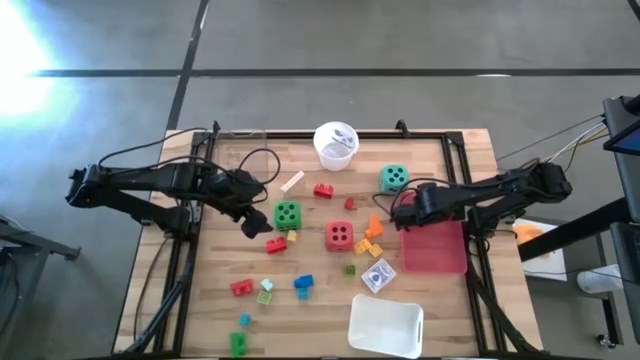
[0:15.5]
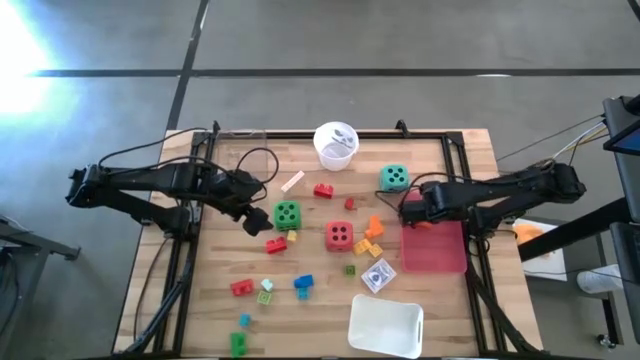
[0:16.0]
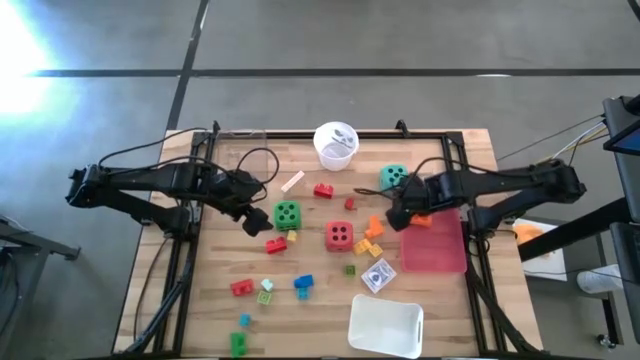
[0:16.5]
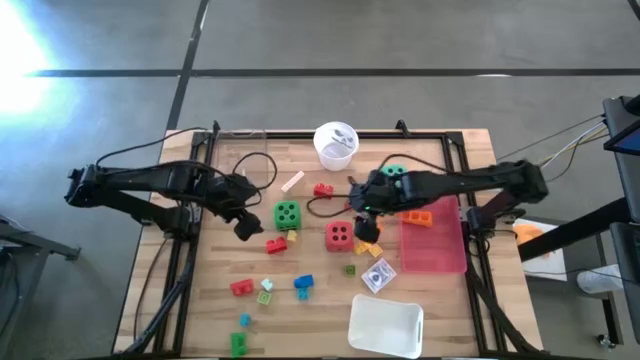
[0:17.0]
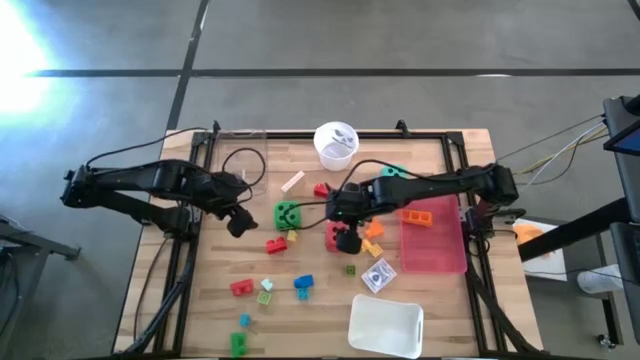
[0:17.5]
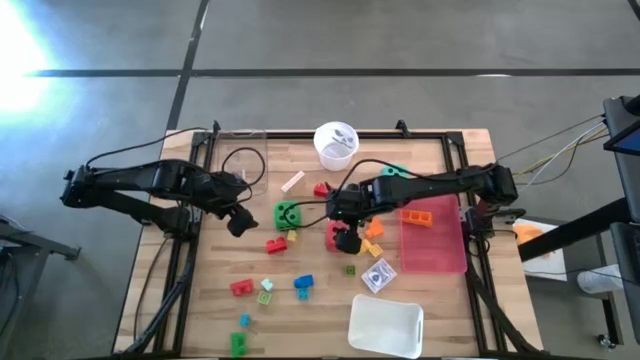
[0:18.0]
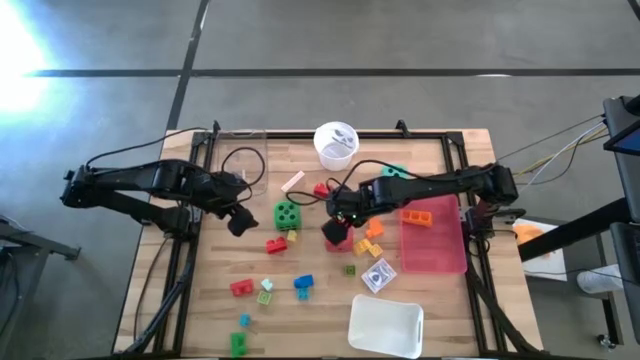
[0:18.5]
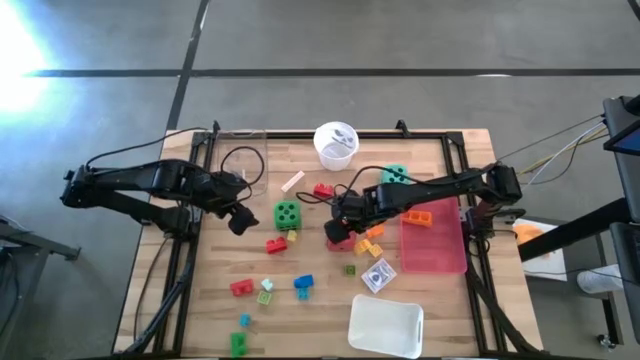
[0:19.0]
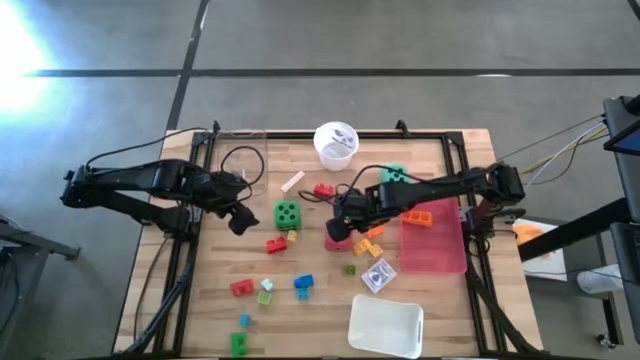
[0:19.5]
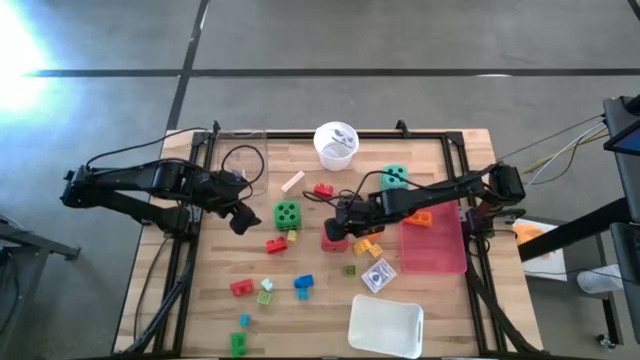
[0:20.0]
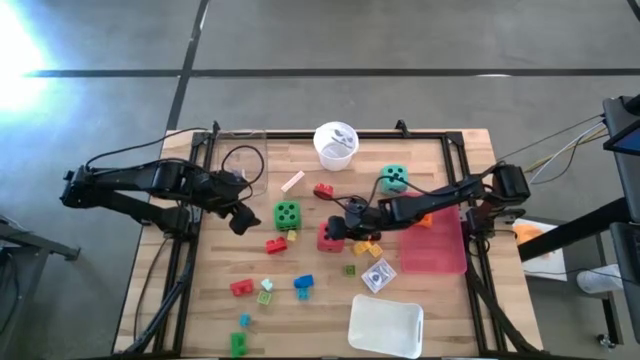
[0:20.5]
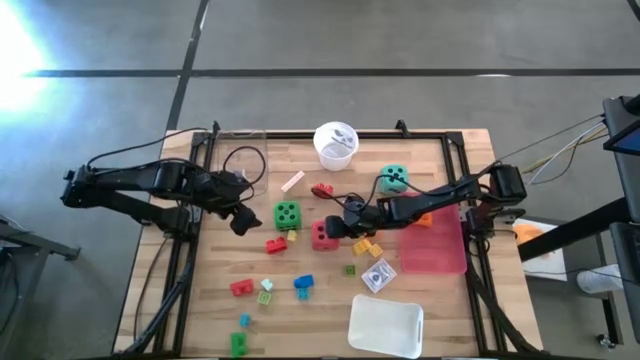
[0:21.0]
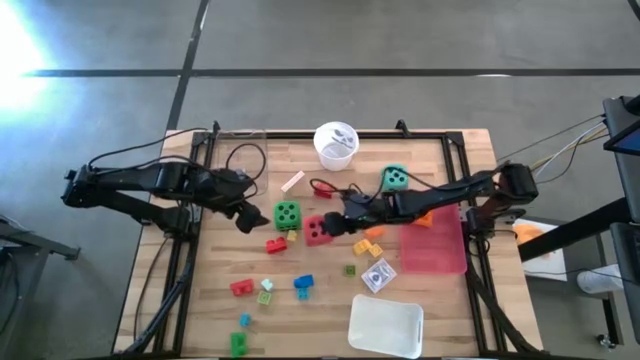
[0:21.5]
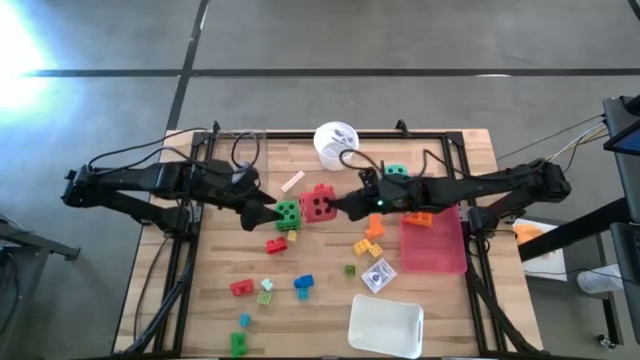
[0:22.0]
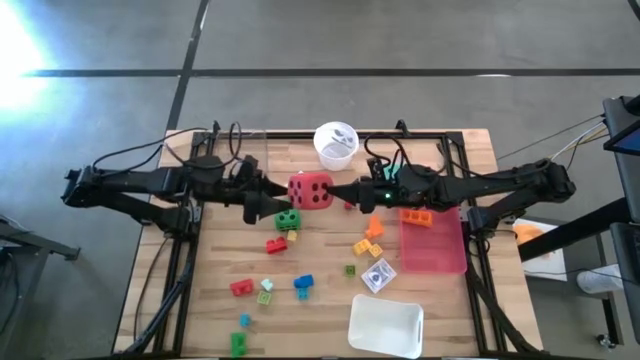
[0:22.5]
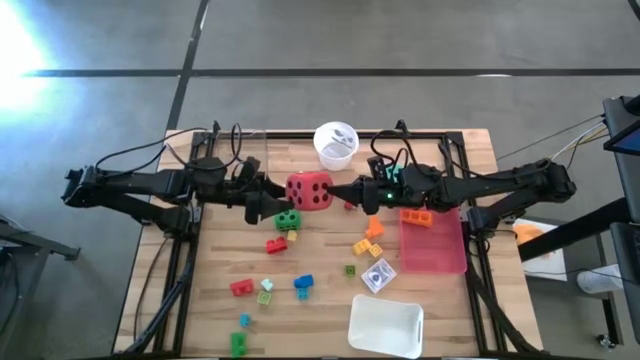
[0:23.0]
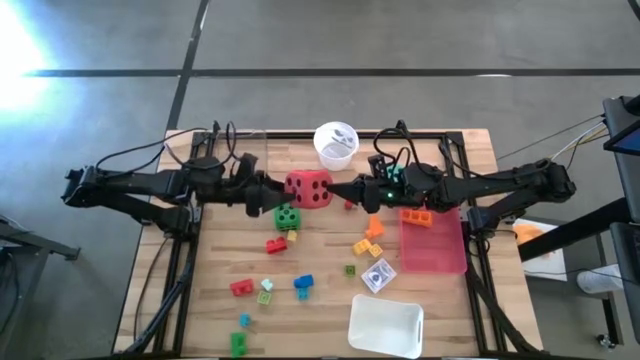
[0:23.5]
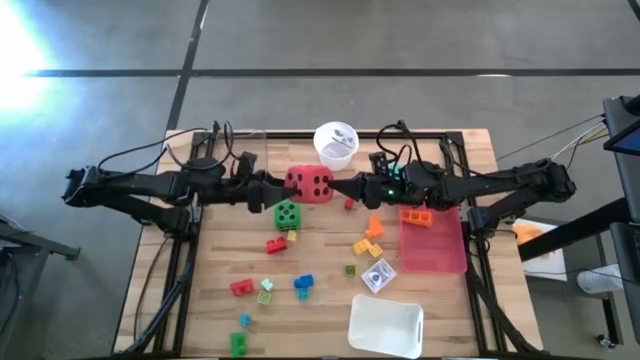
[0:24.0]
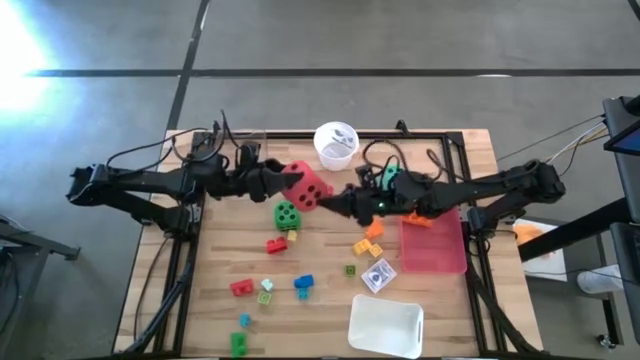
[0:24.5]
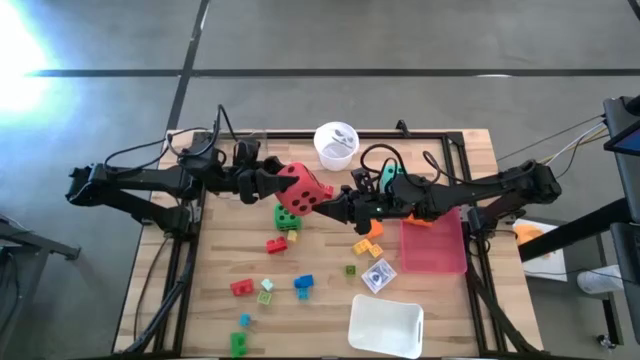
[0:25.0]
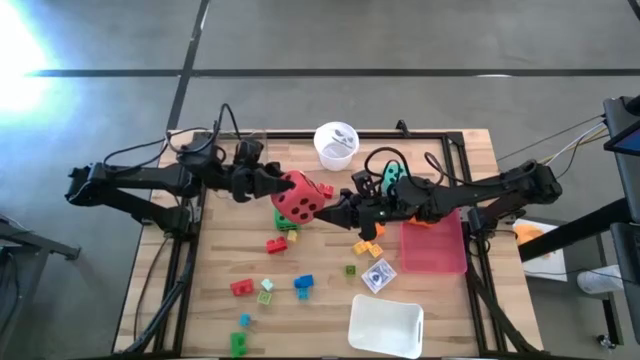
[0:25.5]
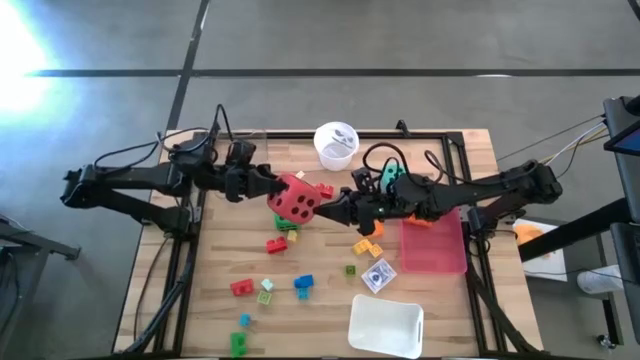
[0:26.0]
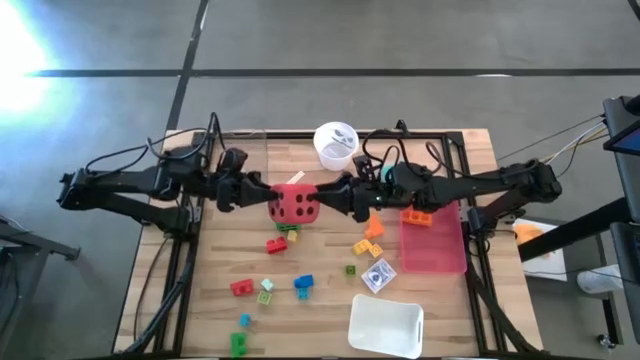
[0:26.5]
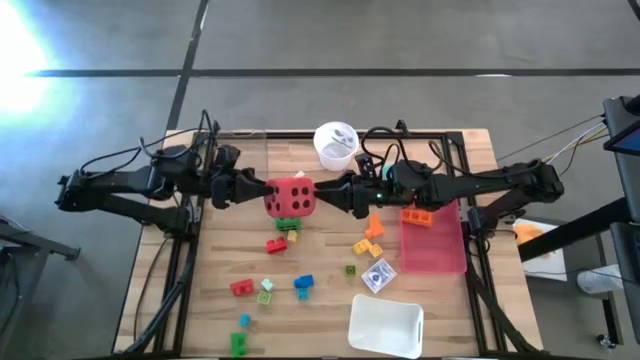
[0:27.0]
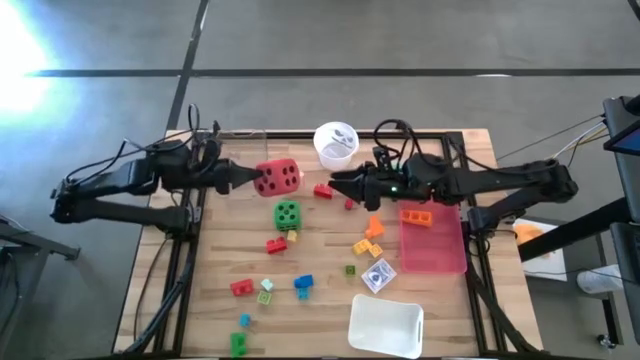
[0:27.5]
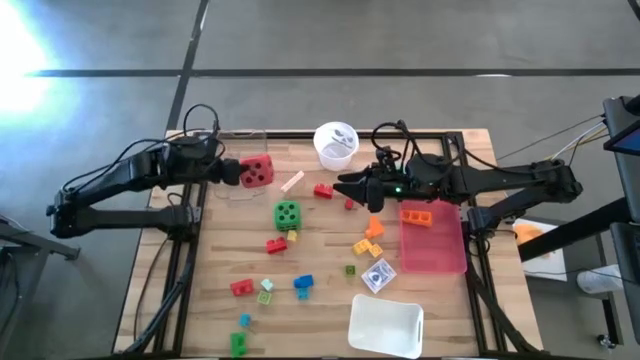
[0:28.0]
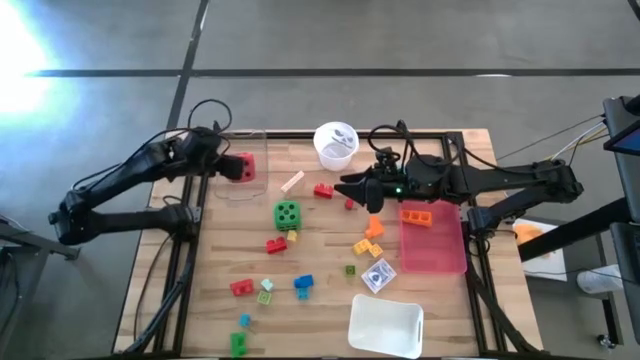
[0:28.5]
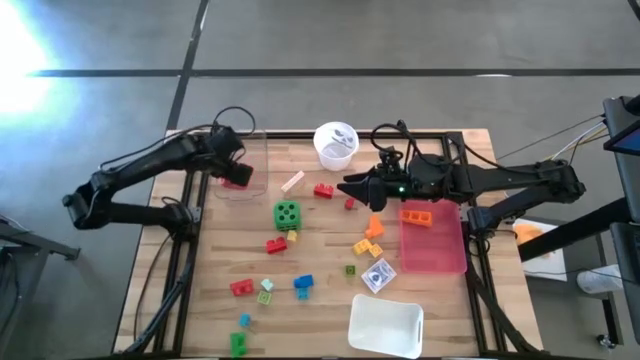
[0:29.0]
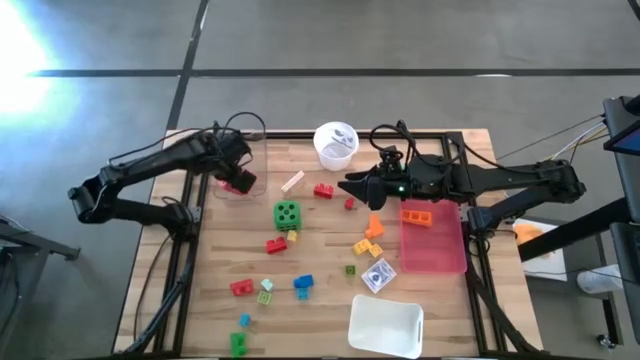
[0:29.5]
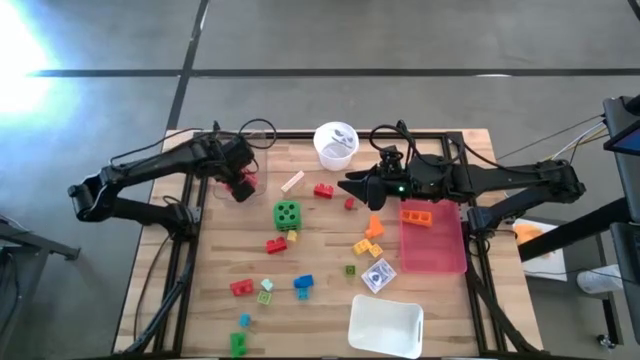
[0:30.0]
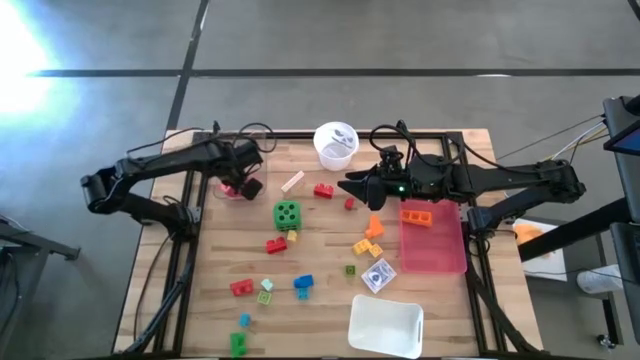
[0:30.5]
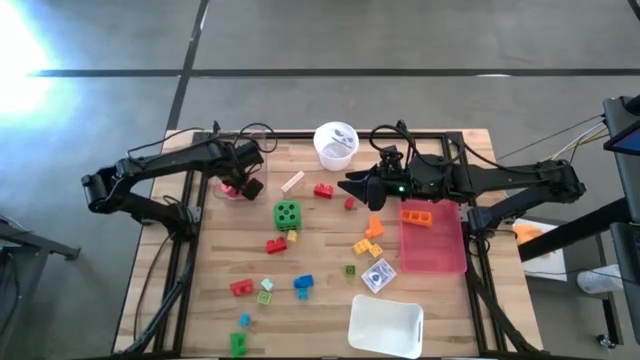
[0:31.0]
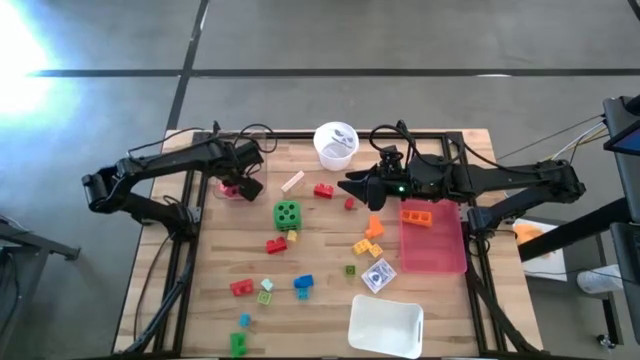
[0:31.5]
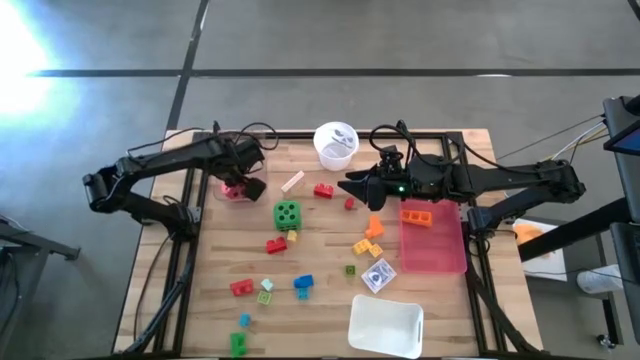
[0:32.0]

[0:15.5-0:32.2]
Task: Pick & Place Toys
Put the red dice into the transparent bin

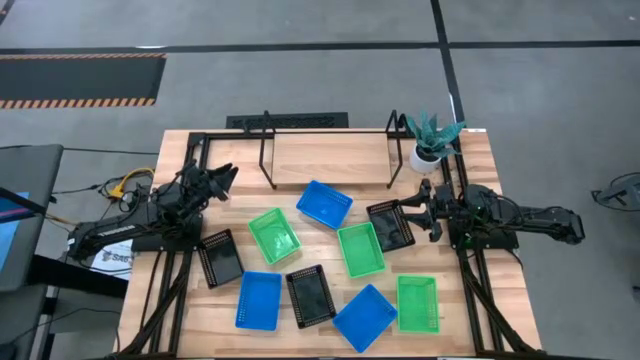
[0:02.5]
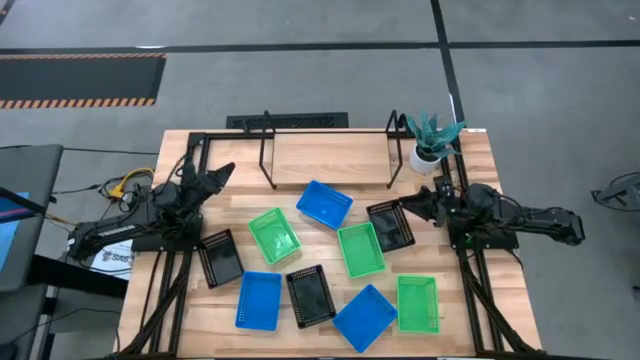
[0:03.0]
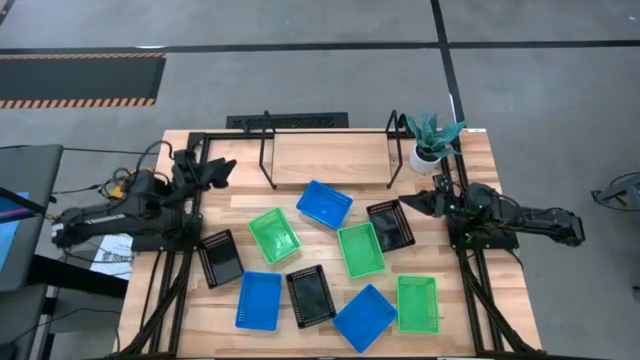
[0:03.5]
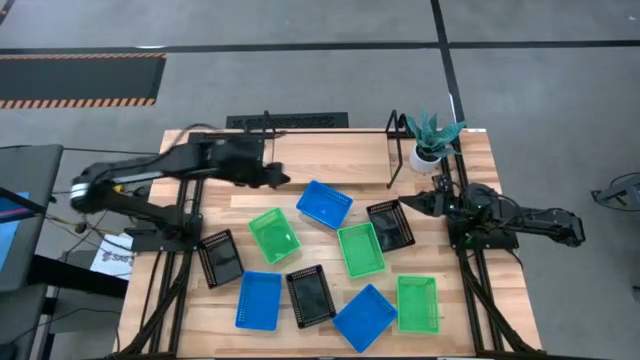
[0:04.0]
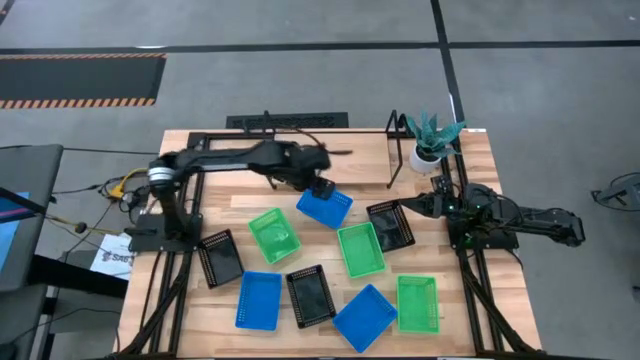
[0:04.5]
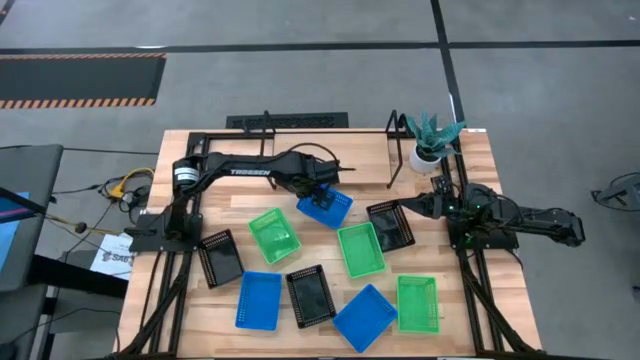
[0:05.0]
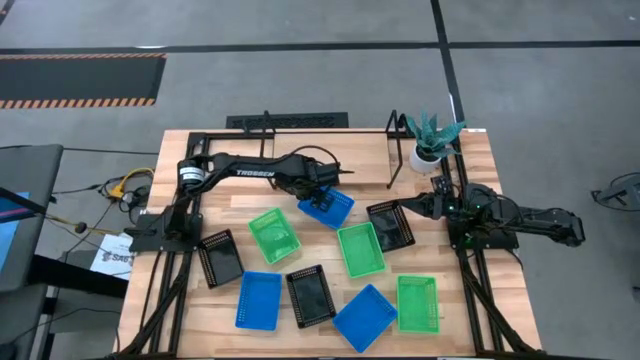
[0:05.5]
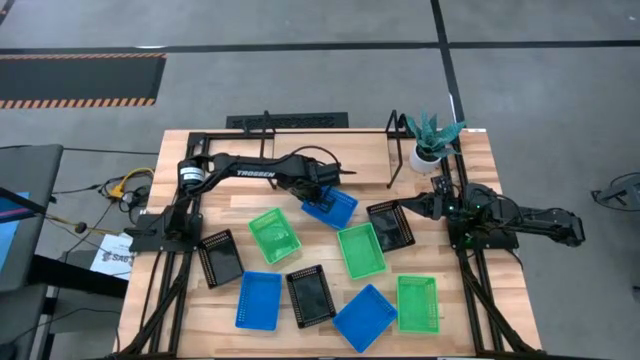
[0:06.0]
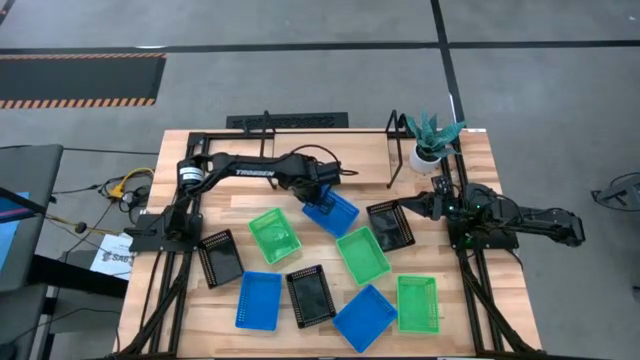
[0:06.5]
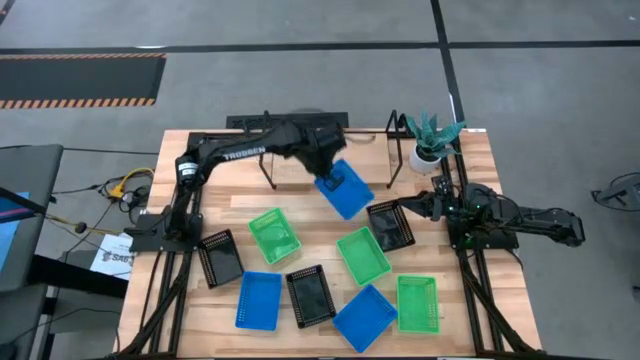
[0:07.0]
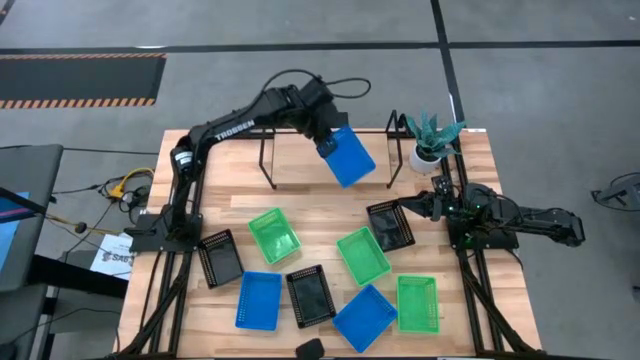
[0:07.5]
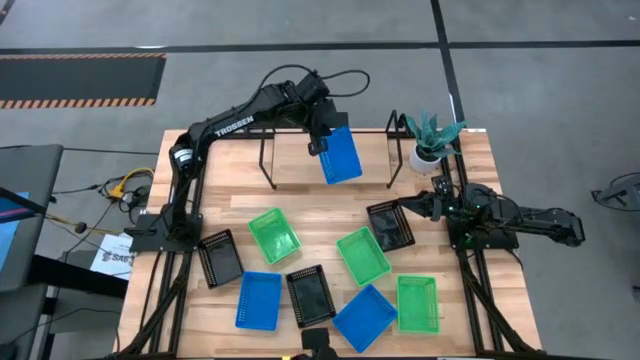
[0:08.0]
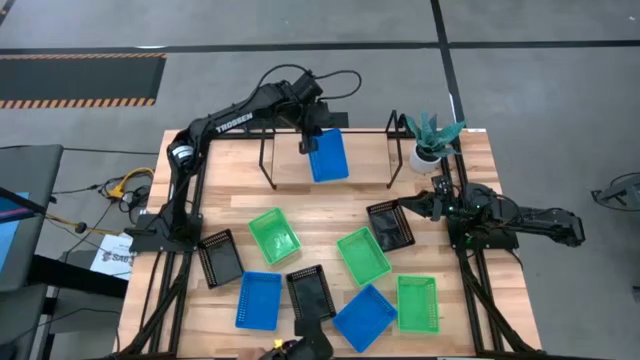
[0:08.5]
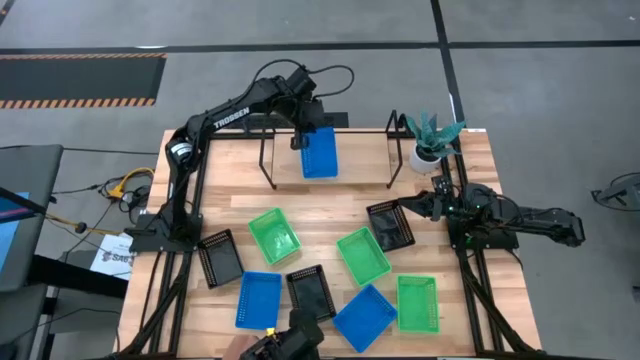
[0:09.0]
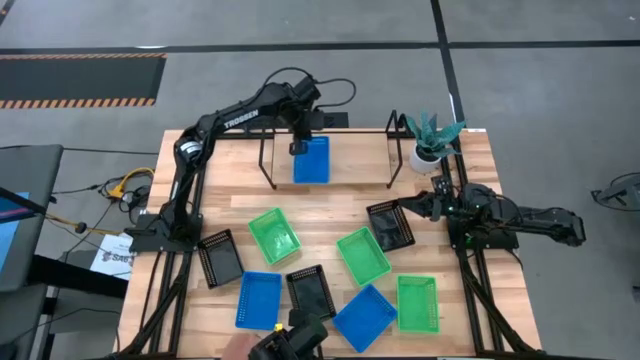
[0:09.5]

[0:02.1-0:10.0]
Task: Stack baskets on shelf by color
Put the top blue bin on the shelf
